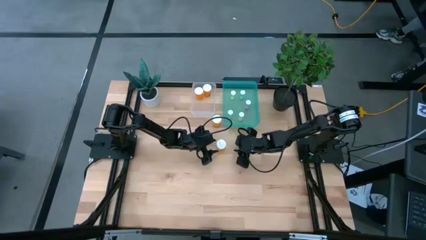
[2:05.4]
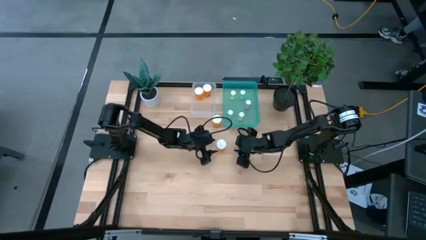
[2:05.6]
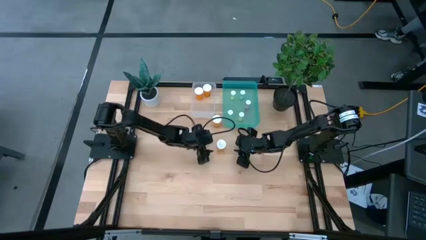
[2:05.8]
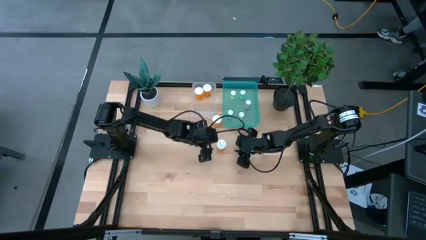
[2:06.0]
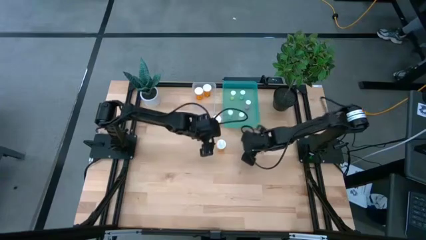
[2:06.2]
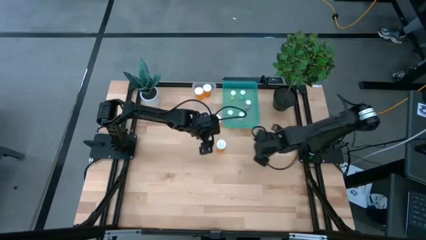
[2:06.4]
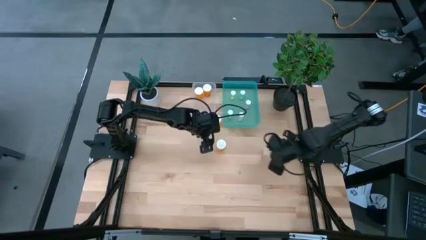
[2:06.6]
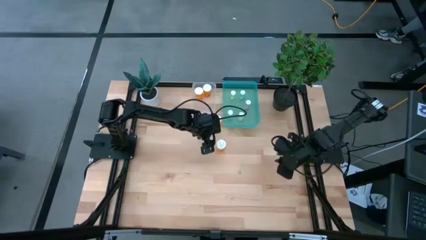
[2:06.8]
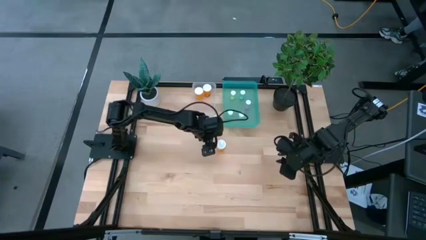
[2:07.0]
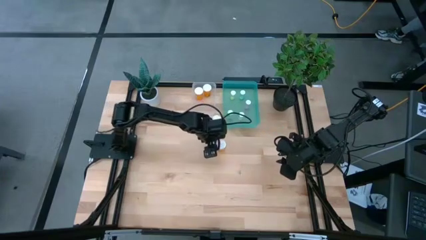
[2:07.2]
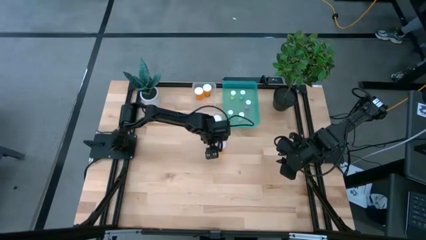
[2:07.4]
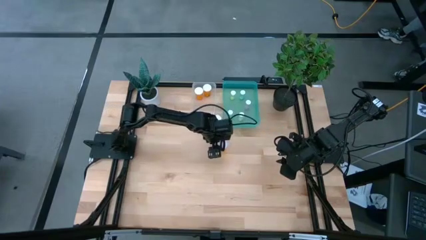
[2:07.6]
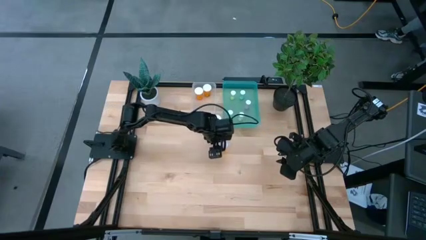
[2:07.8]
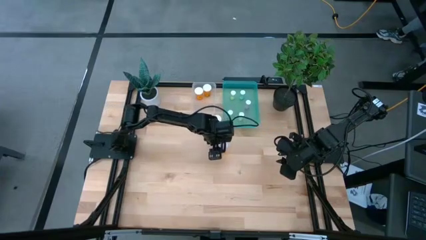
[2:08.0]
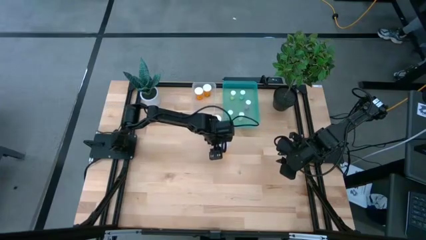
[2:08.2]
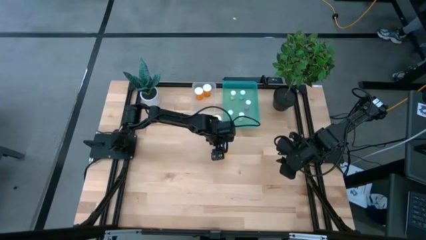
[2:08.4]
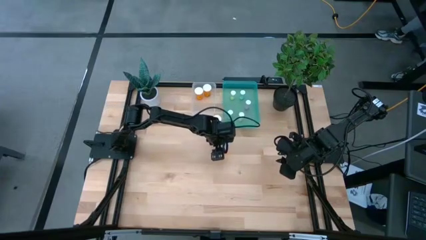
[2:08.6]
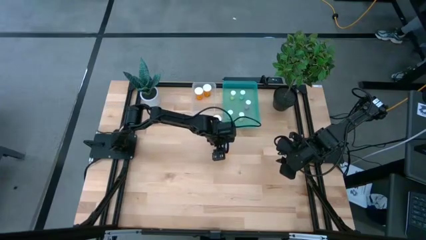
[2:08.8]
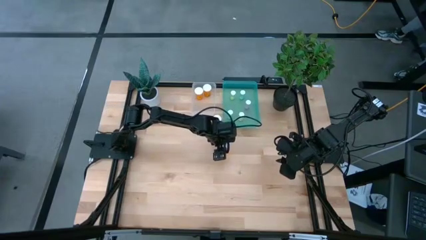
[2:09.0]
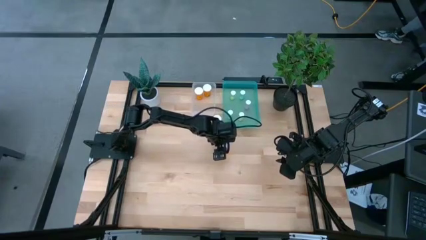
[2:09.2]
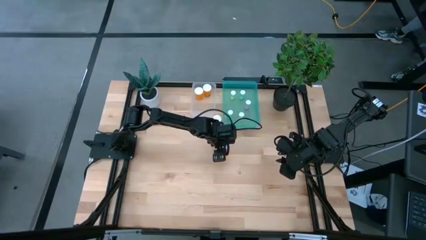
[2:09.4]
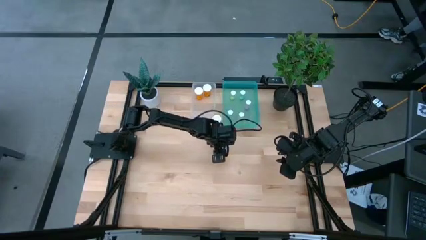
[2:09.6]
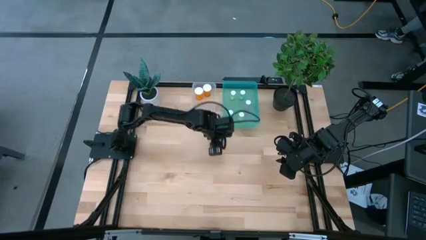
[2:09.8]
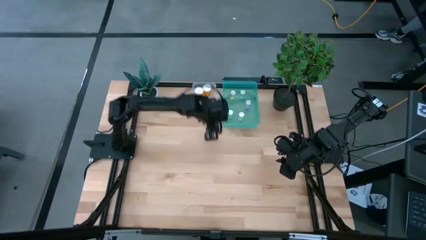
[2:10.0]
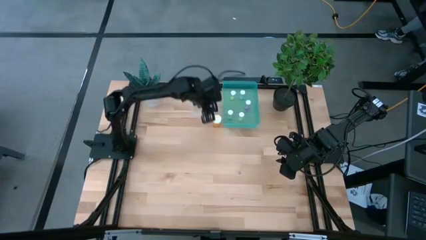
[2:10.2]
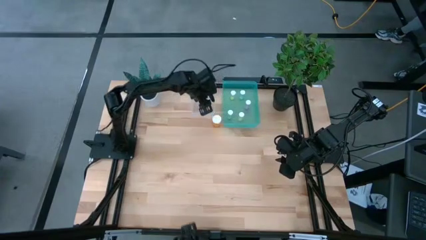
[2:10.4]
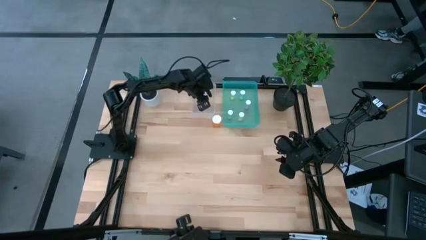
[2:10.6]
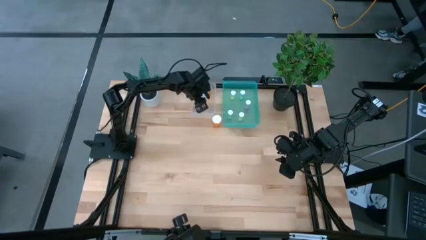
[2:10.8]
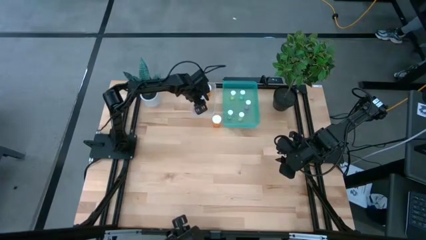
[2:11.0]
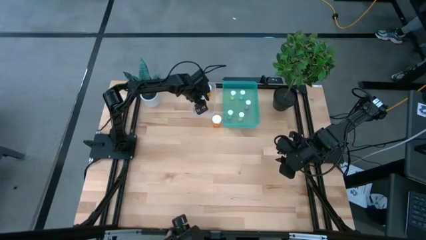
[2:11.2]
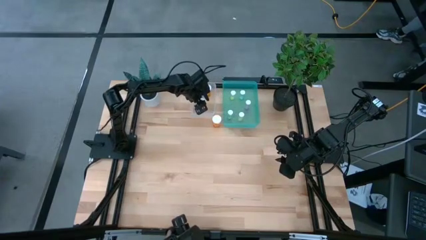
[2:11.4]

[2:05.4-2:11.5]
Task: Pick and place medicine bottles into bin by pill shape (circle, oval)
Put the orange capsule bottle into the transparent bin

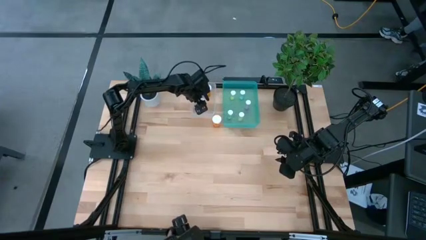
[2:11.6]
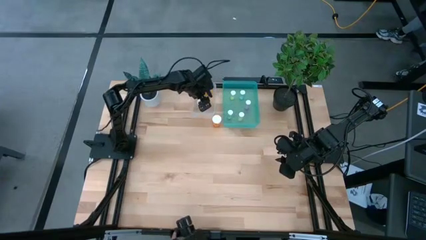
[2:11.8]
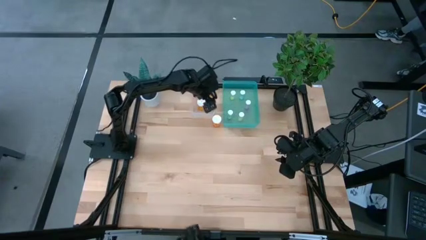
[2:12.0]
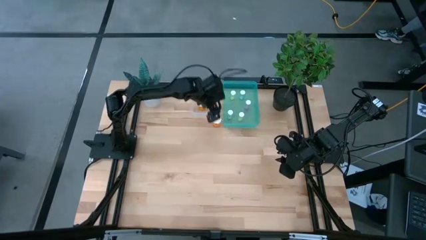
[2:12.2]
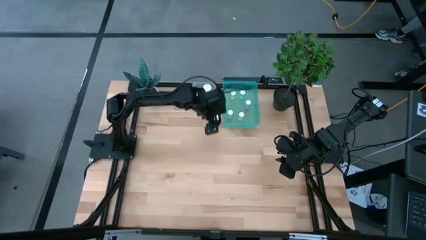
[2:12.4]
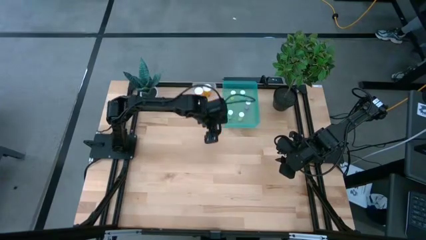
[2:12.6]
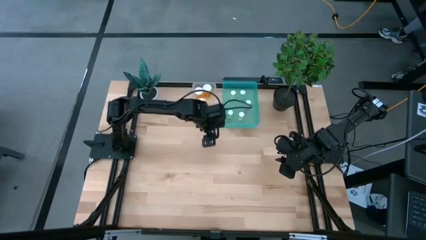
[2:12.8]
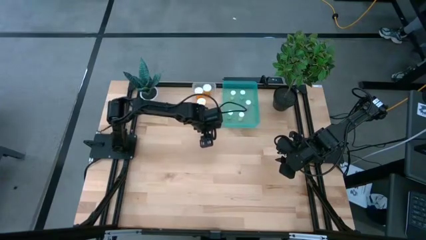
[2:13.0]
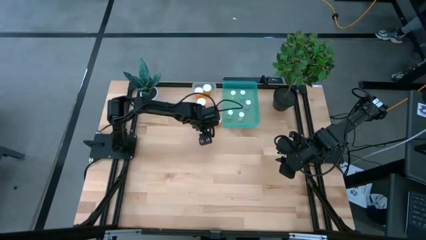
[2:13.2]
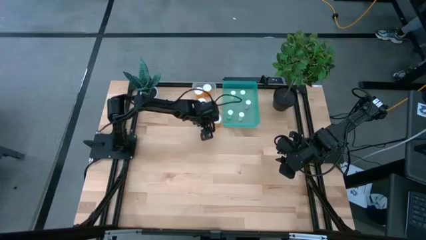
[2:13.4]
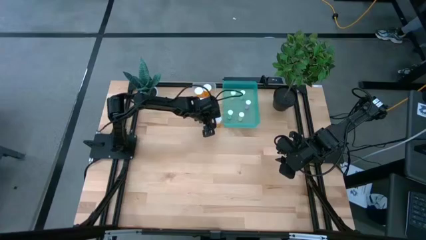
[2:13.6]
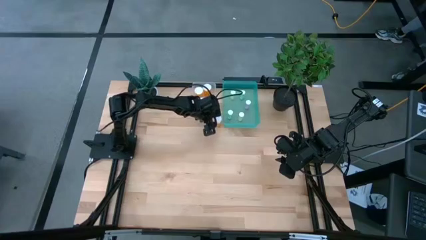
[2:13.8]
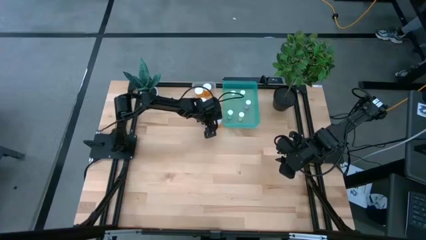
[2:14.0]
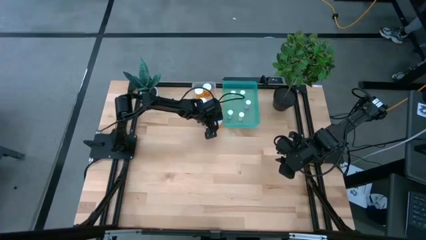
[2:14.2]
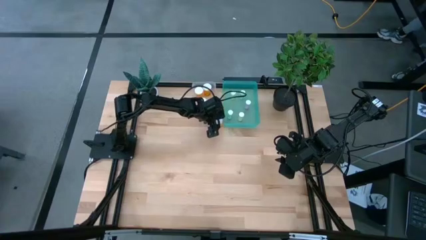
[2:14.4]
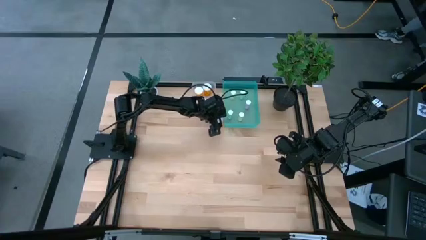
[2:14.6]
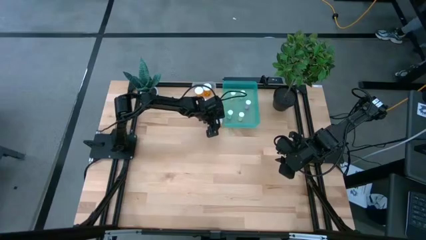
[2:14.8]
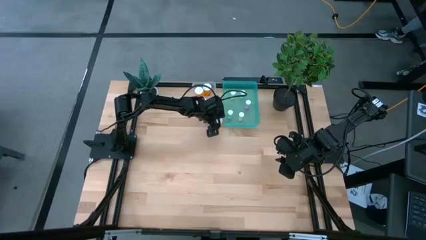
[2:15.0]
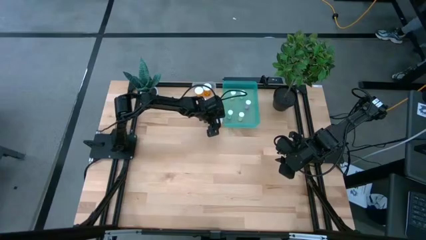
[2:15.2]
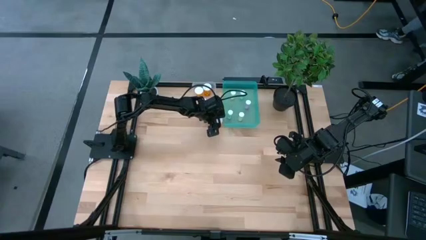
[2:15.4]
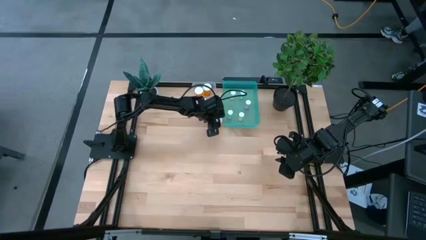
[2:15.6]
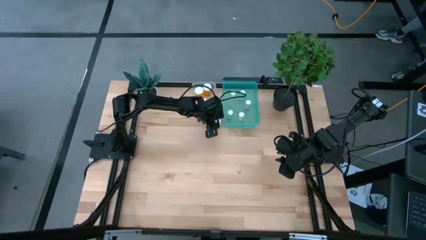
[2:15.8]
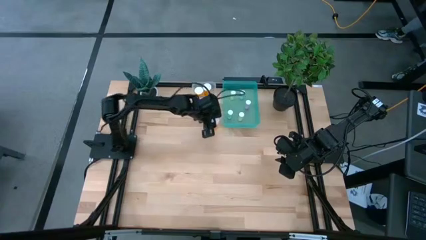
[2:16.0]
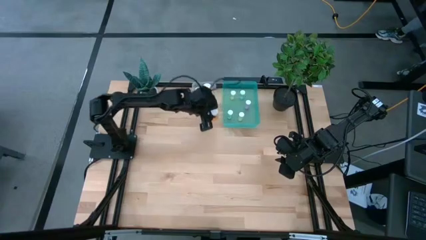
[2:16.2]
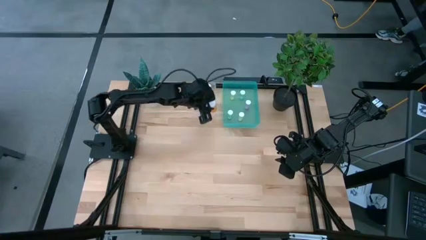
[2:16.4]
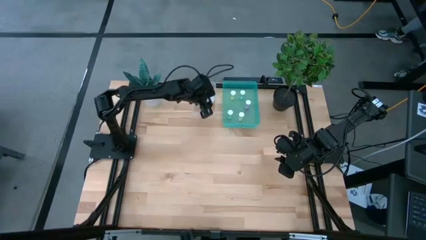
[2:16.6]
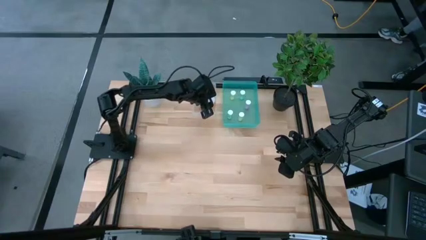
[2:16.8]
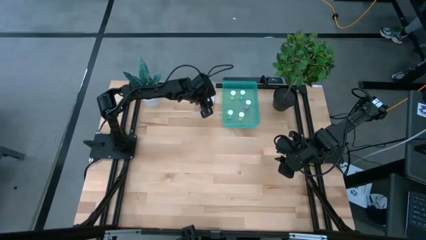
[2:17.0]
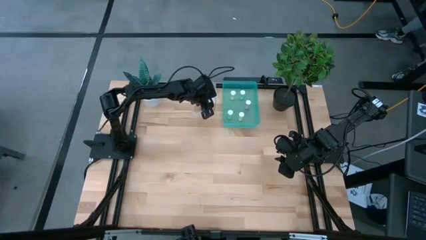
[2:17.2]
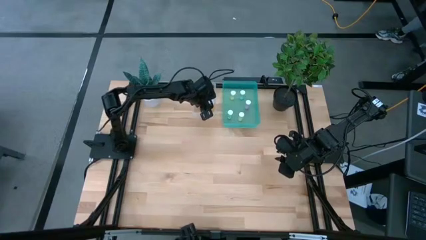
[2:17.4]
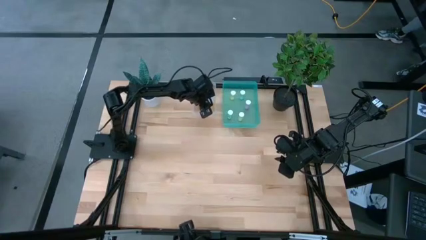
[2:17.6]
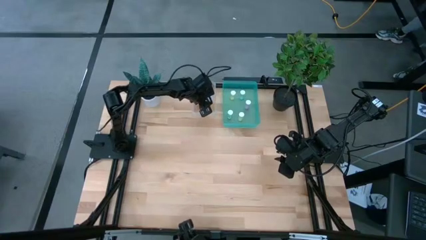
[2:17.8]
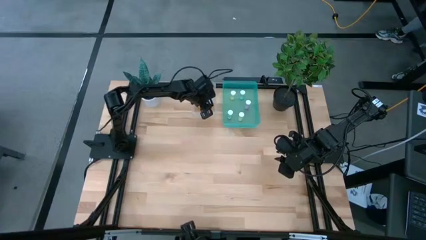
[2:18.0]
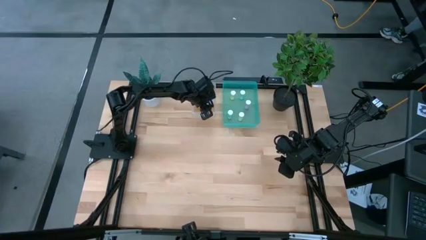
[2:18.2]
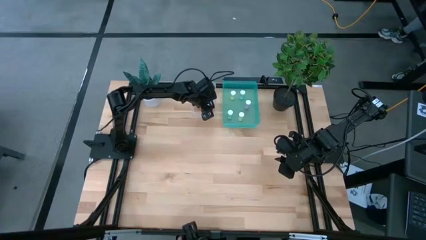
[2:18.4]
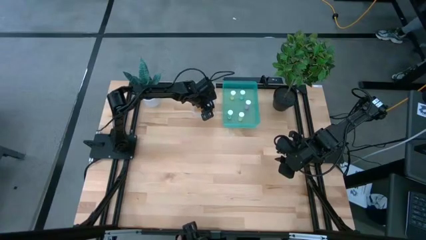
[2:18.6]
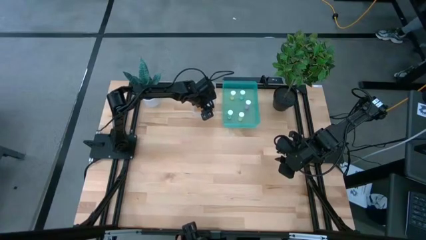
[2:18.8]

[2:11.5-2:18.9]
Put the orange capsule bottle into the transparent bin
